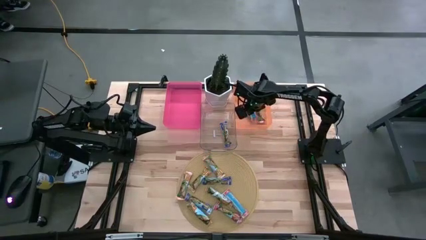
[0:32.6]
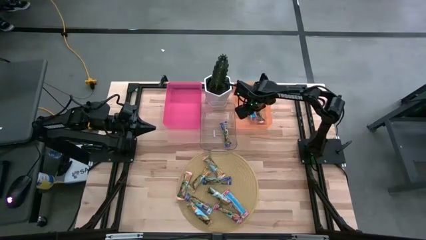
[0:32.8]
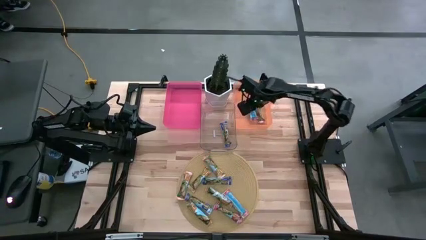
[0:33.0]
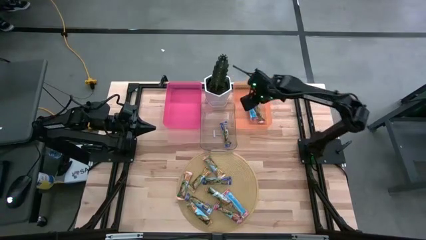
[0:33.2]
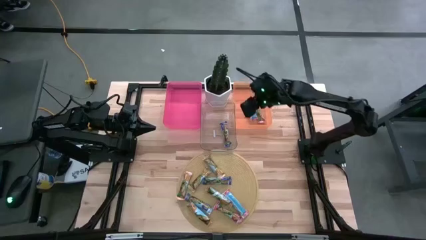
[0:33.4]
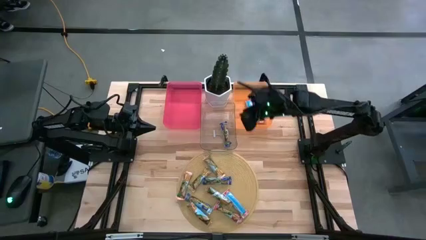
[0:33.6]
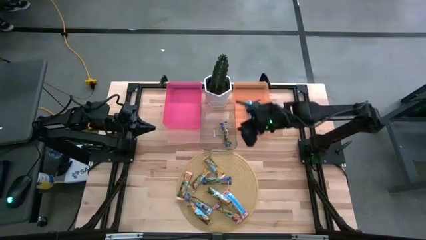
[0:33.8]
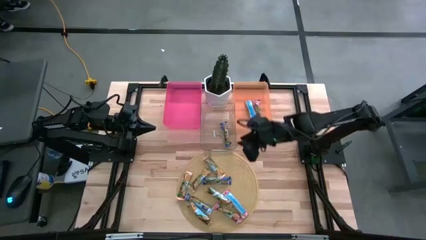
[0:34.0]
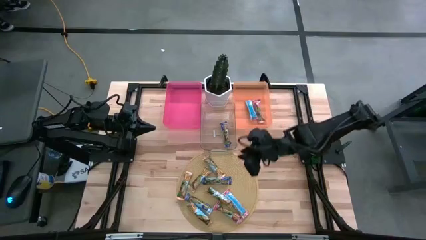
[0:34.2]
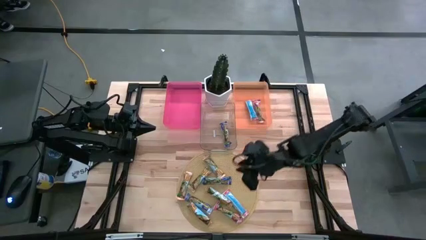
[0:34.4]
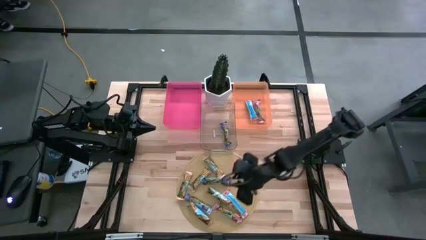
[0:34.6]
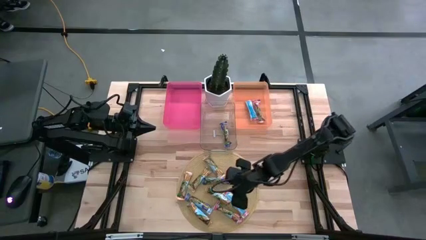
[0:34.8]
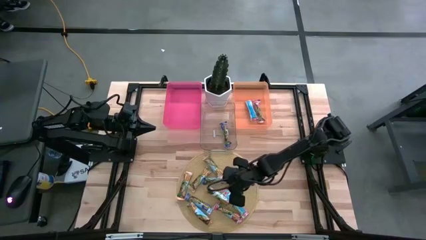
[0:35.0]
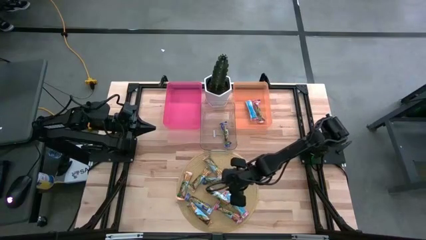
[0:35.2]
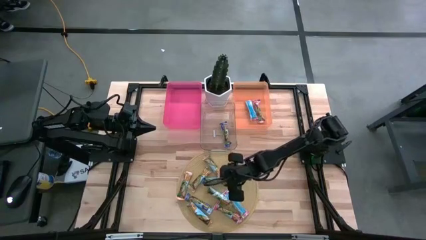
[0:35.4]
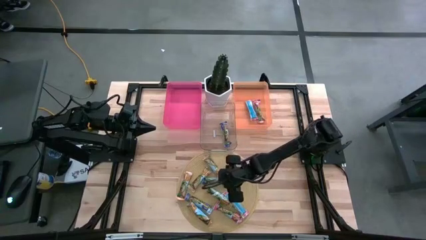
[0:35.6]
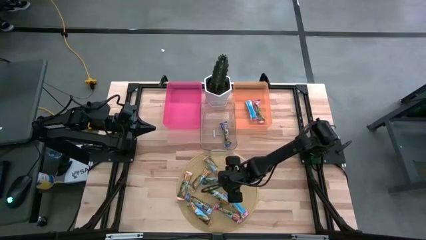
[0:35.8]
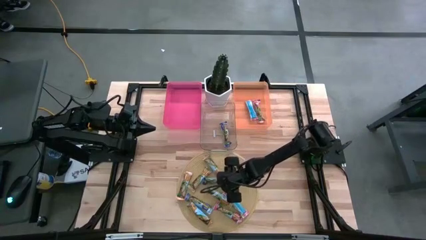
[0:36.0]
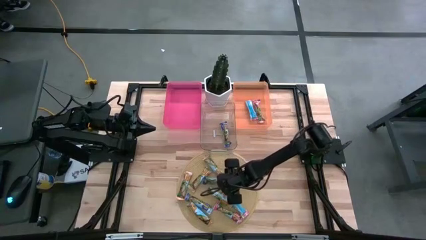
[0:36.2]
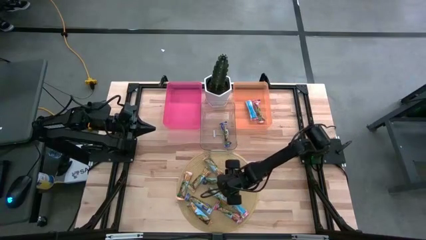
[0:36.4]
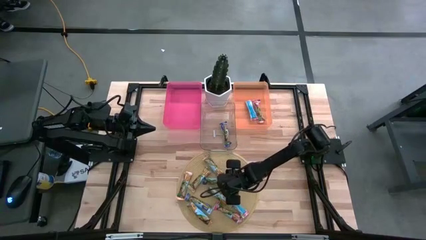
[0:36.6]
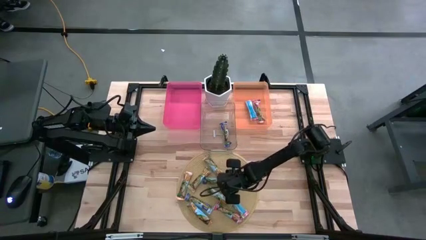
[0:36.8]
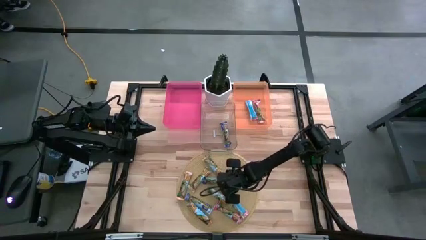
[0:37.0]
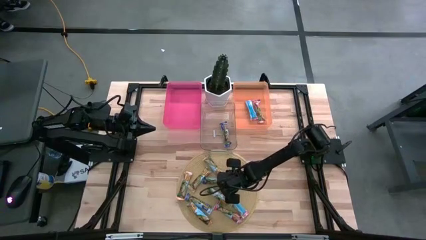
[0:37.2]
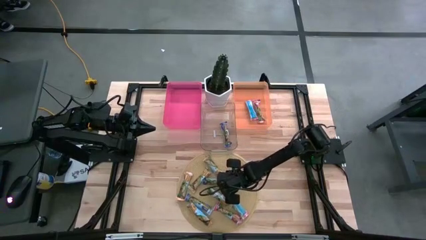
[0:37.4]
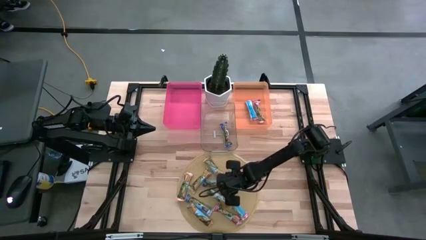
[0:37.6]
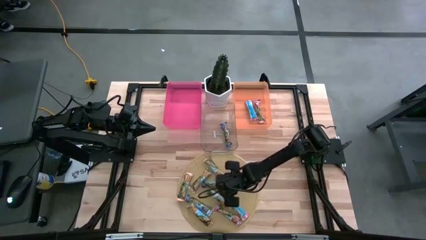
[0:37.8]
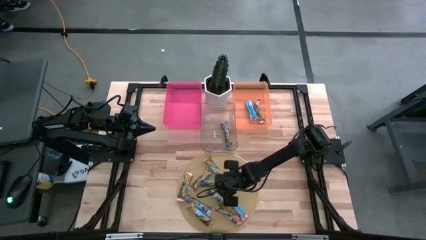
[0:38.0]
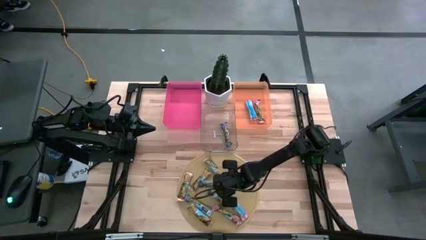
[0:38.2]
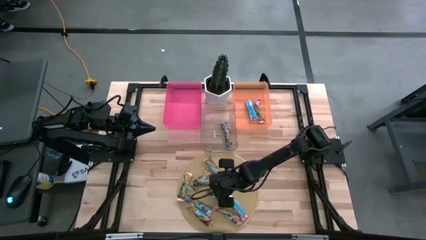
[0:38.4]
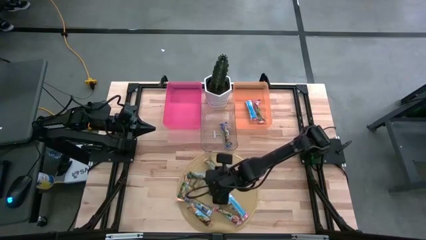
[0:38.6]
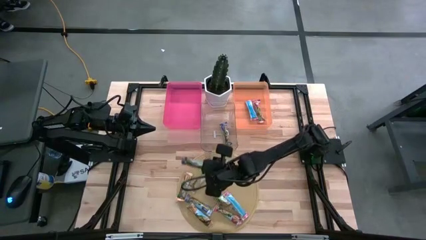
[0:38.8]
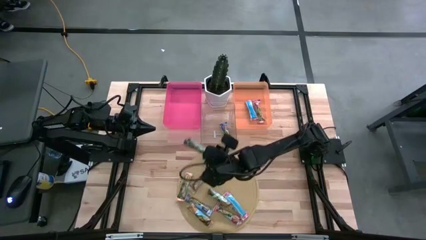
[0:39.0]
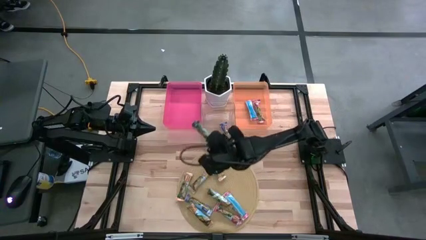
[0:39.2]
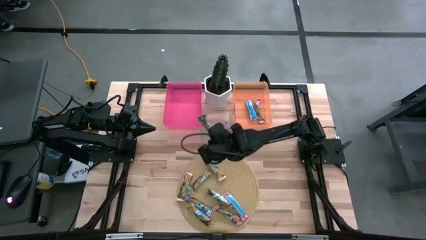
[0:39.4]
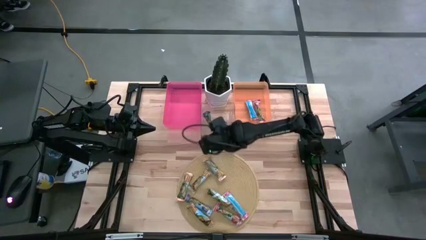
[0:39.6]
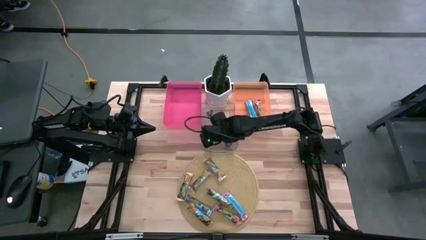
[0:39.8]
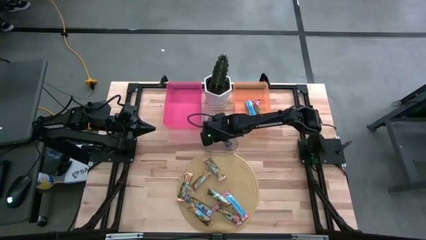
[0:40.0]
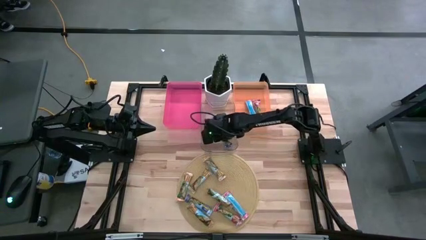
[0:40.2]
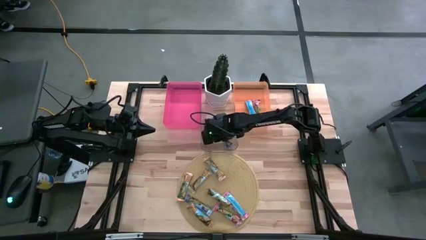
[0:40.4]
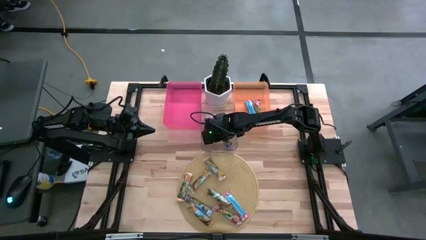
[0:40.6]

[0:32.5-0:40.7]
Task: Pick and place Granola Bars by type
Put the blue granola bar into the transparent bin

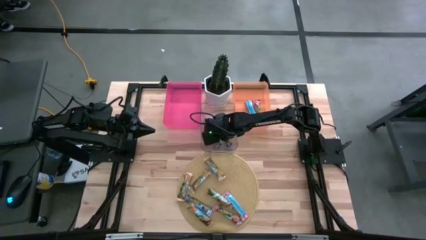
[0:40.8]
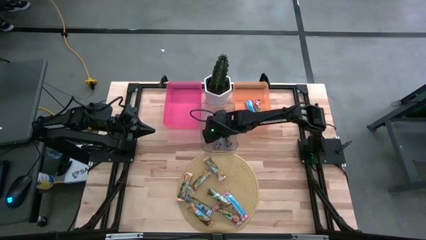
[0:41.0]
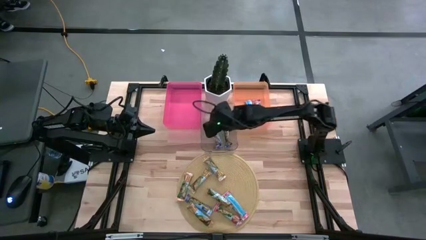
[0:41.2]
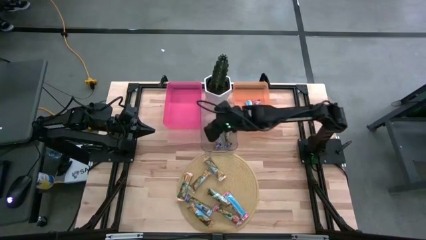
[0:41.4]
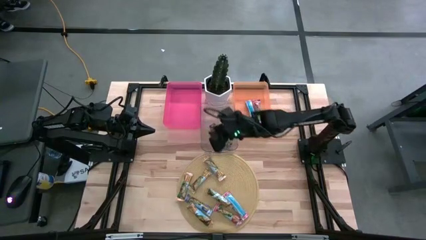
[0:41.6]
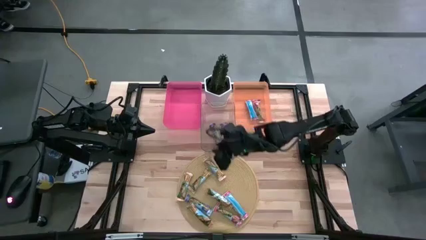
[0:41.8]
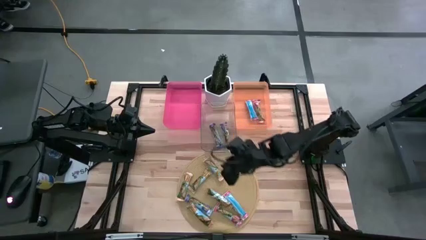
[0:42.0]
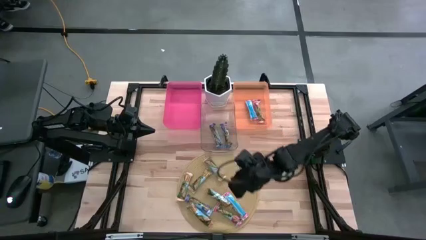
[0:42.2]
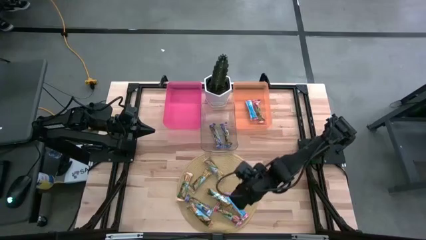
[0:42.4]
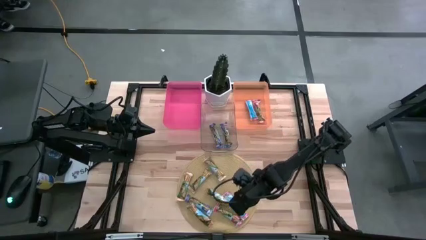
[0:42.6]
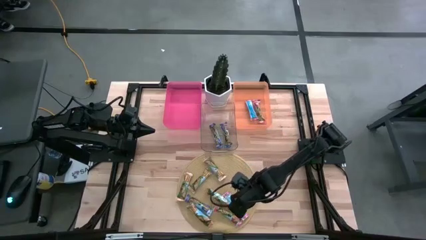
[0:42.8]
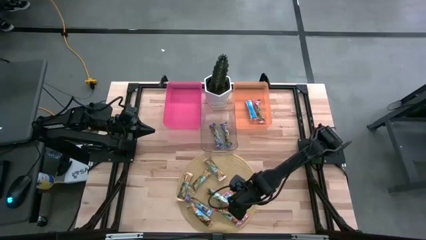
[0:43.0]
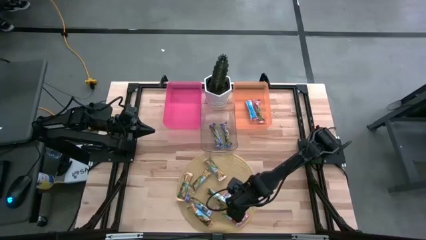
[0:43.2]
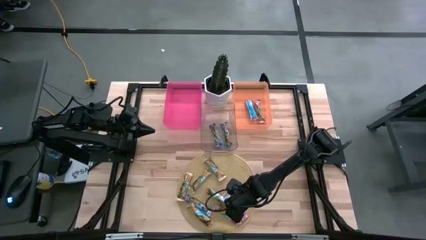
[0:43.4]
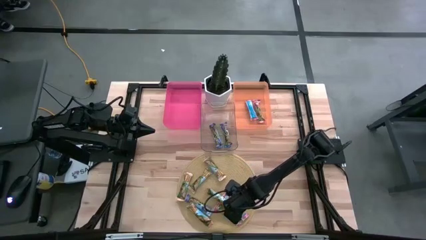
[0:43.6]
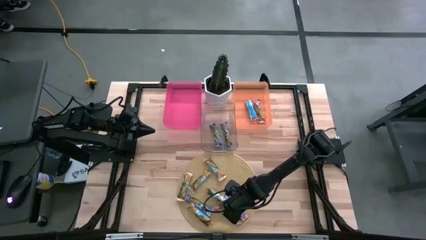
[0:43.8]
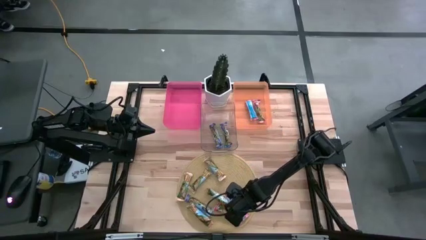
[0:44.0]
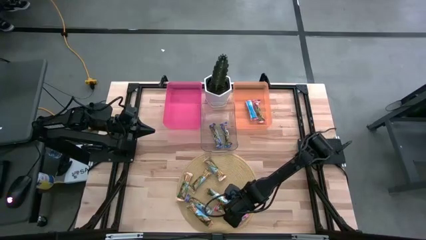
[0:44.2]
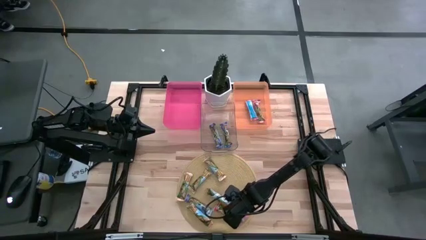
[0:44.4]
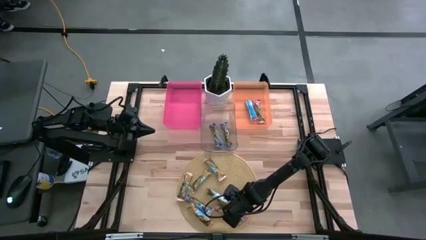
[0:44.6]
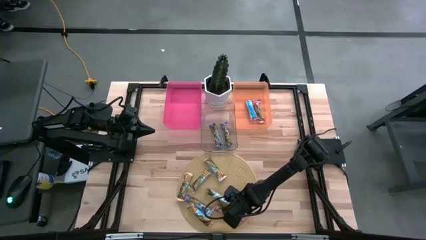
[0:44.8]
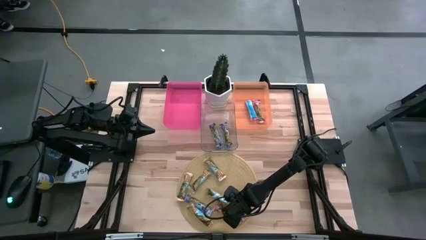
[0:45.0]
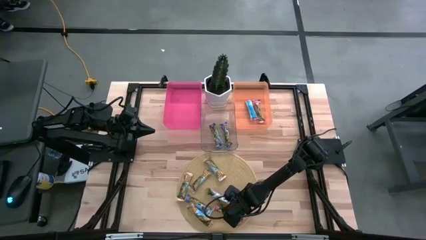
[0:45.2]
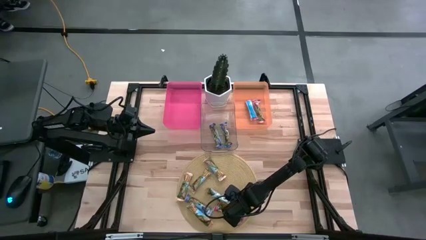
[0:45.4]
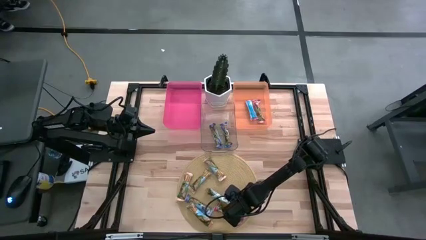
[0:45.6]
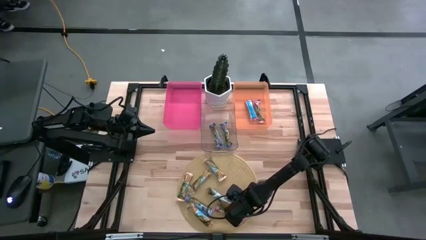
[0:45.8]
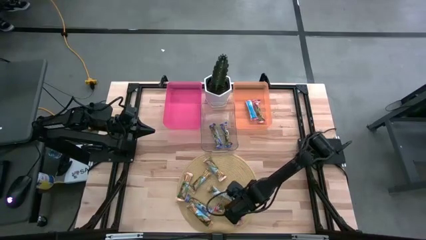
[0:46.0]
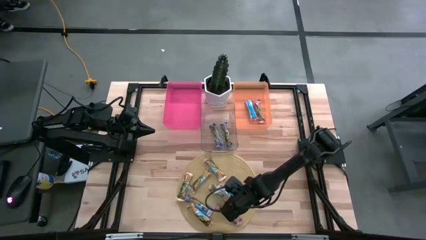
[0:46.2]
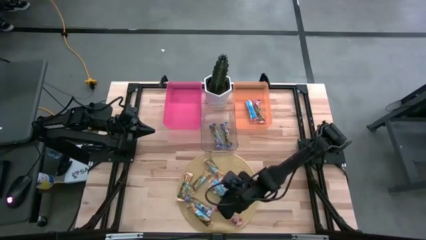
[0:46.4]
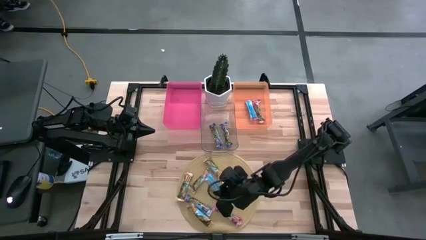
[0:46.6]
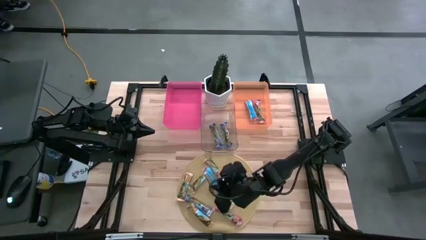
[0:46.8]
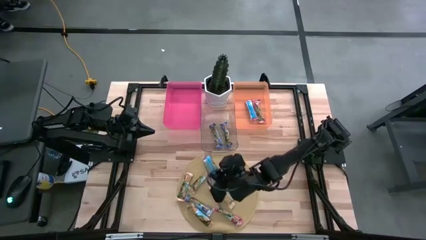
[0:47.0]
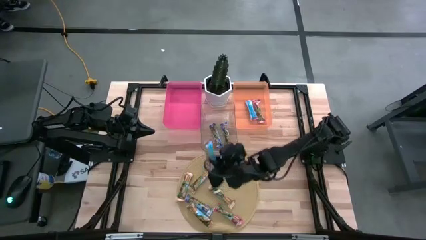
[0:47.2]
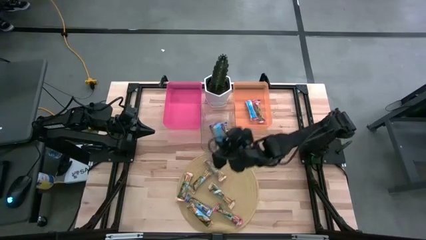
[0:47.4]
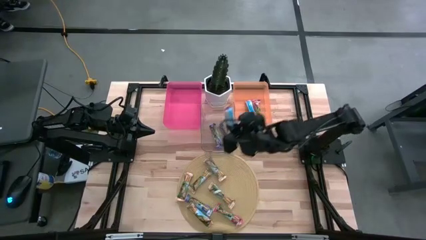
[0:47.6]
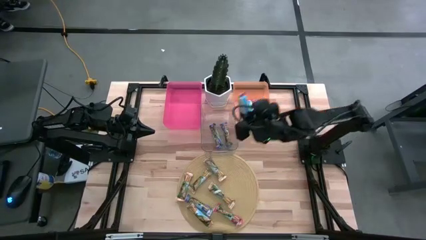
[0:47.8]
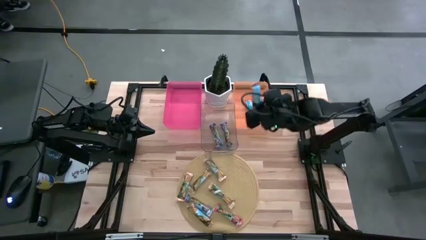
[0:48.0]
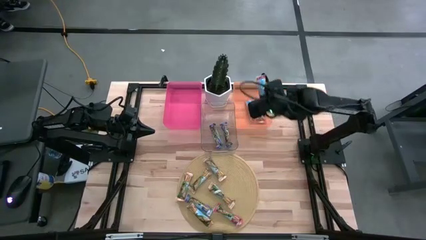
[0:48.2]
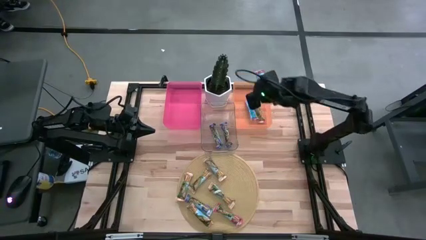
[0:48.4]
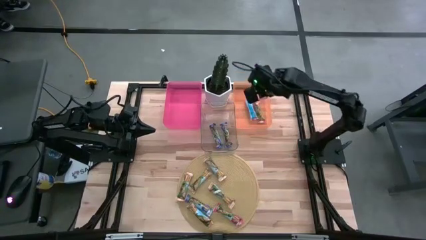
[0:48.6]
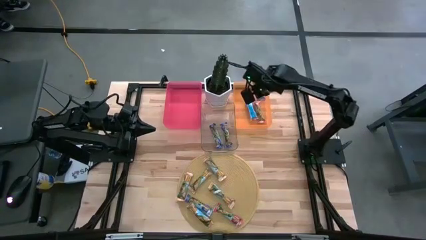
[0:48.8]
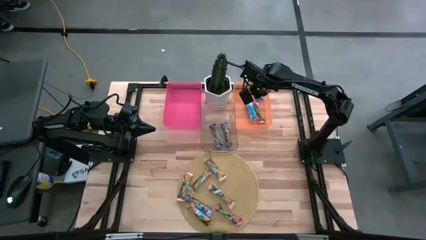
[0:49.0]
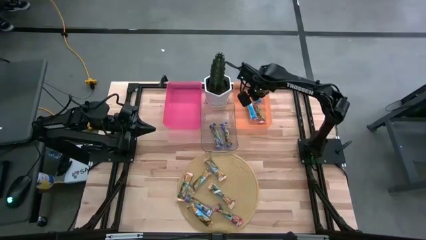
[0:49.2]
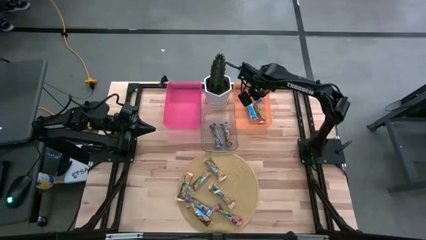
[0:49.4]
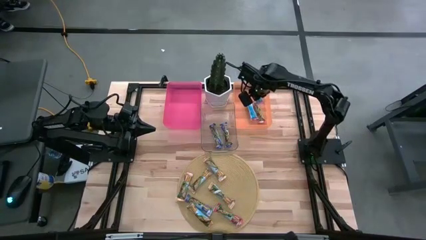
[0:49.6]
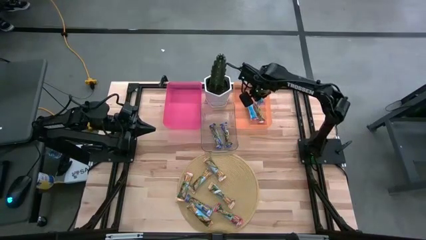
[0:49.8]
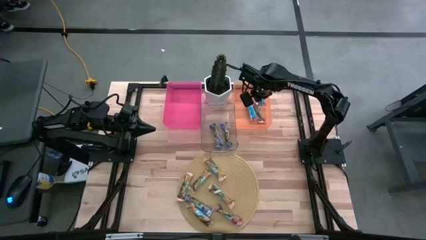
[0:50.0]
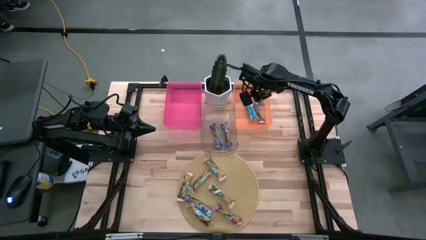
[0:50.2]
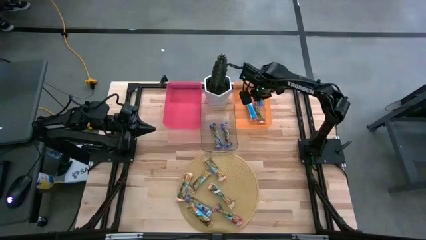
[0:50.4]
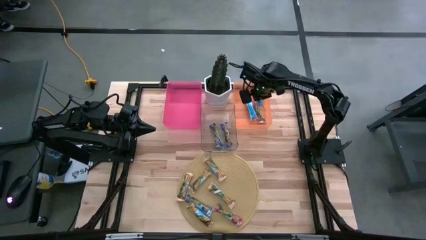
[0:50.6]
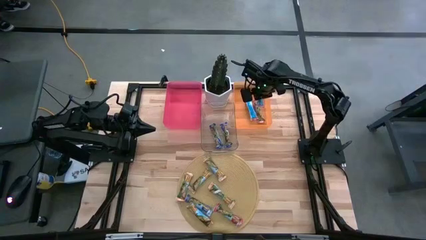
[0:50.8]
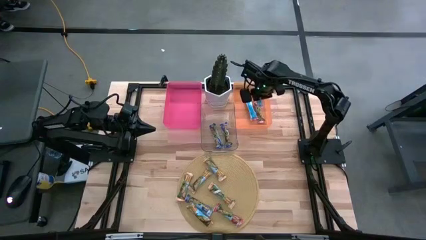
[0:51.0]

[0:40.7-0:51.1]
Put the red granola bar into the orange bin
